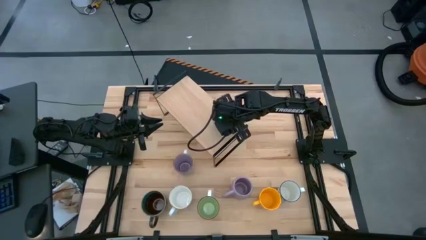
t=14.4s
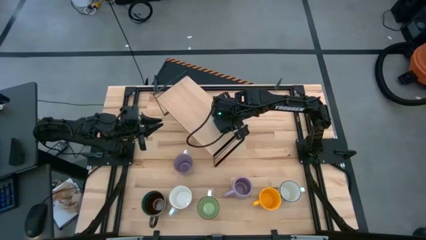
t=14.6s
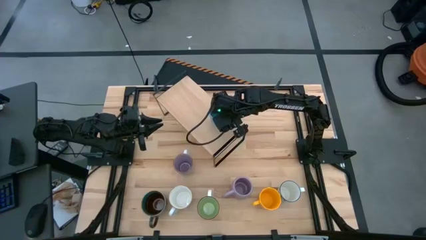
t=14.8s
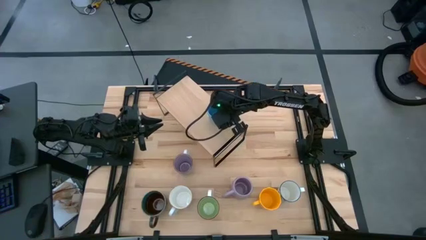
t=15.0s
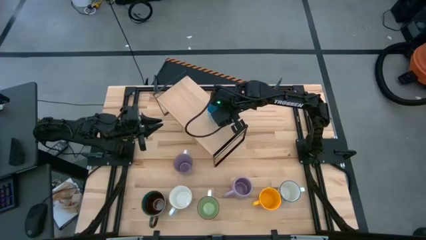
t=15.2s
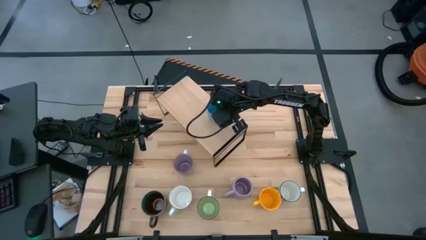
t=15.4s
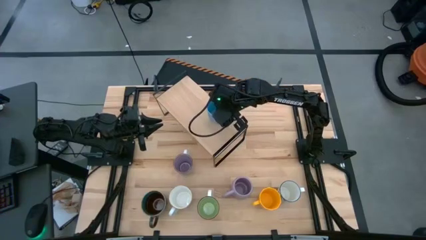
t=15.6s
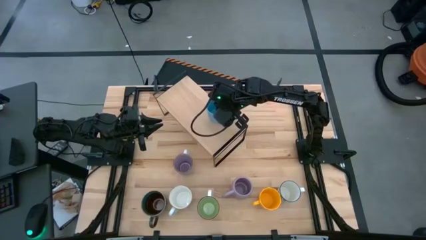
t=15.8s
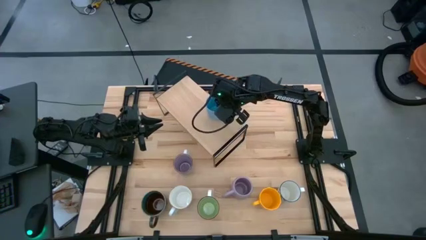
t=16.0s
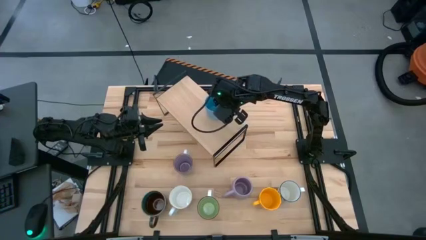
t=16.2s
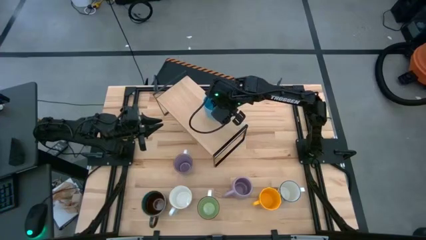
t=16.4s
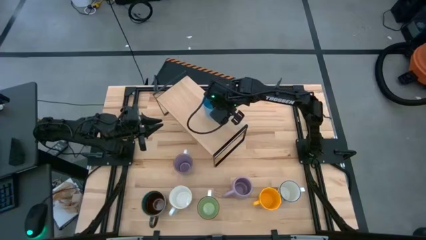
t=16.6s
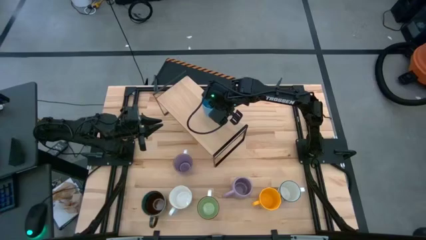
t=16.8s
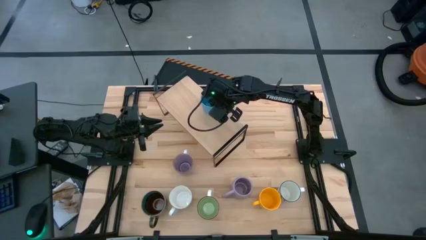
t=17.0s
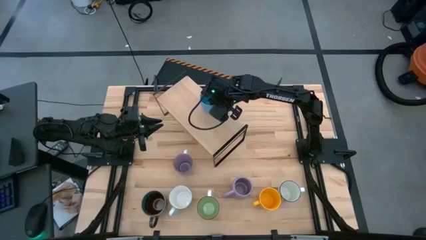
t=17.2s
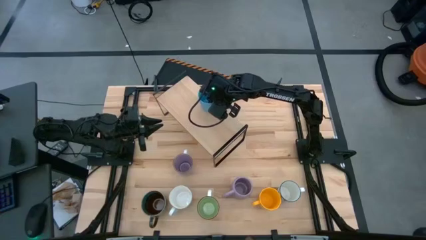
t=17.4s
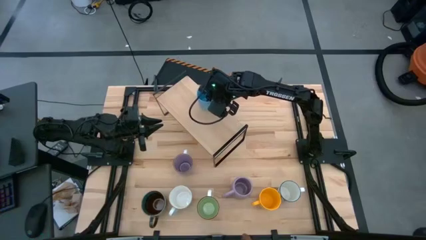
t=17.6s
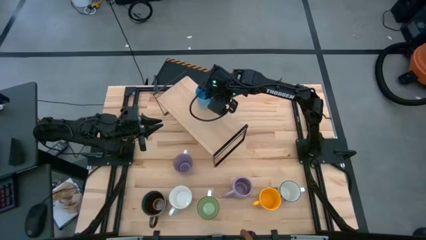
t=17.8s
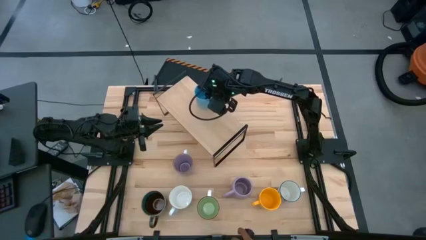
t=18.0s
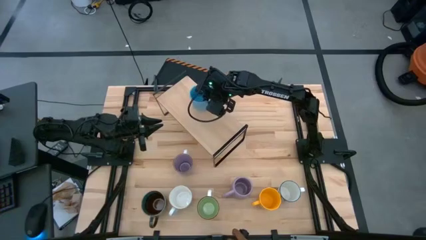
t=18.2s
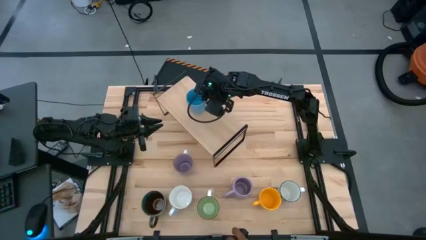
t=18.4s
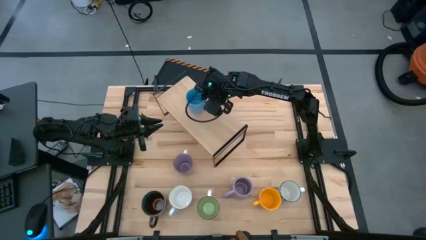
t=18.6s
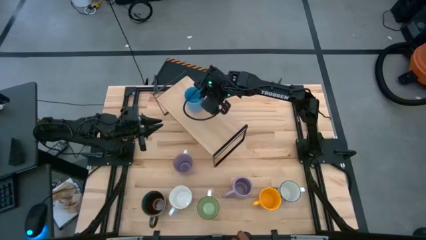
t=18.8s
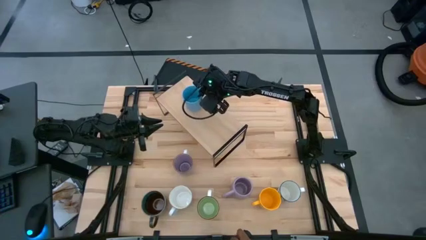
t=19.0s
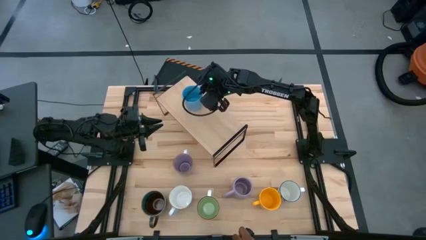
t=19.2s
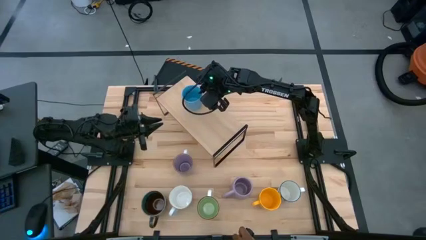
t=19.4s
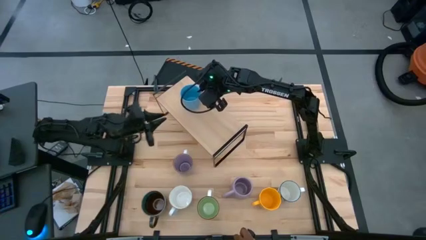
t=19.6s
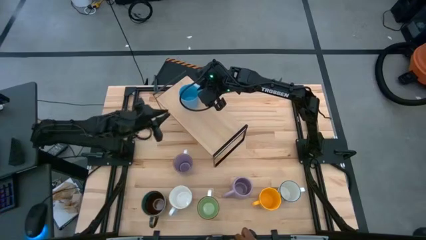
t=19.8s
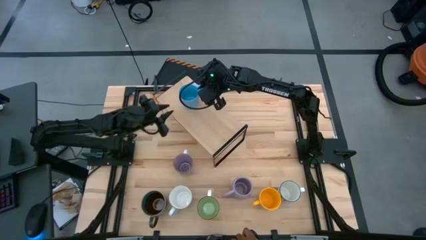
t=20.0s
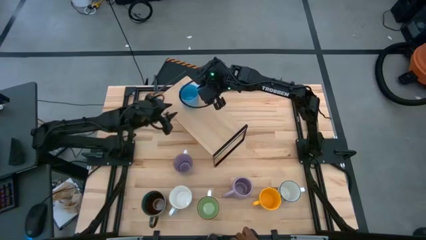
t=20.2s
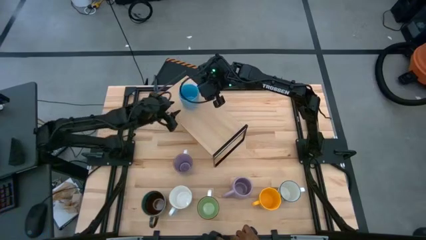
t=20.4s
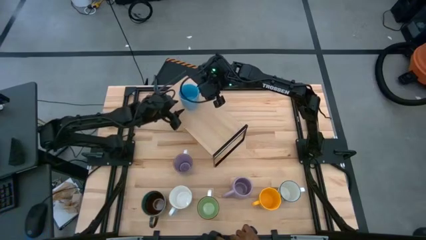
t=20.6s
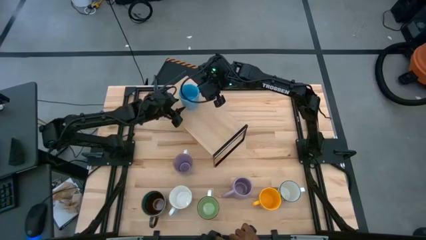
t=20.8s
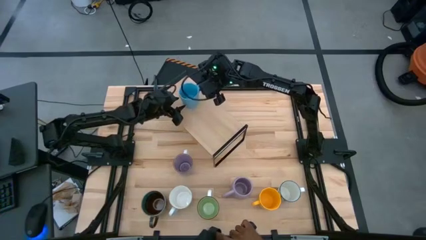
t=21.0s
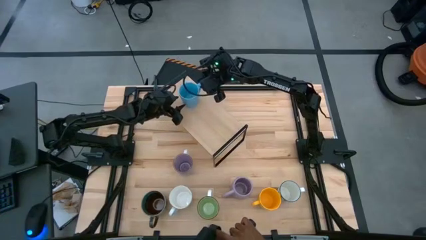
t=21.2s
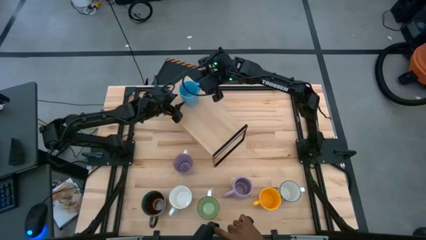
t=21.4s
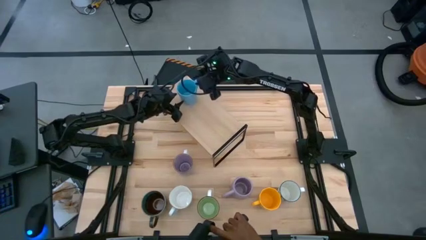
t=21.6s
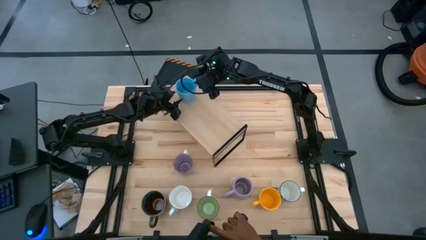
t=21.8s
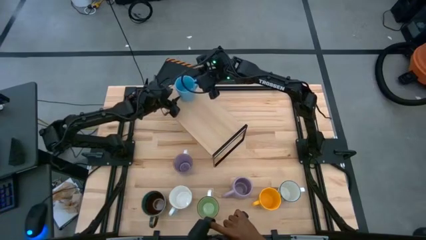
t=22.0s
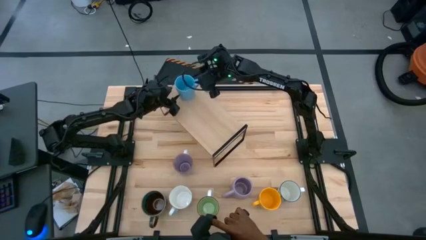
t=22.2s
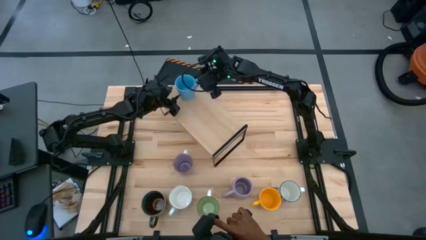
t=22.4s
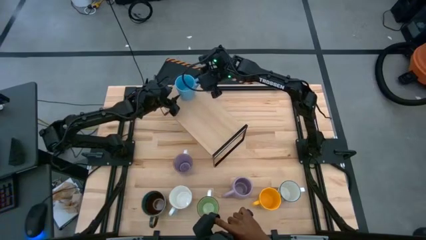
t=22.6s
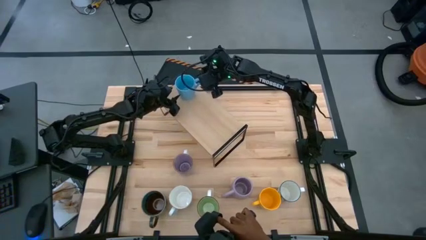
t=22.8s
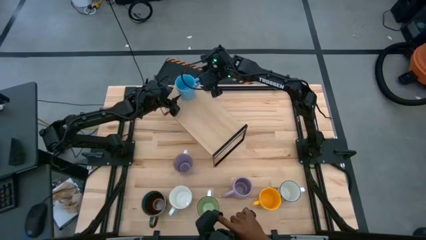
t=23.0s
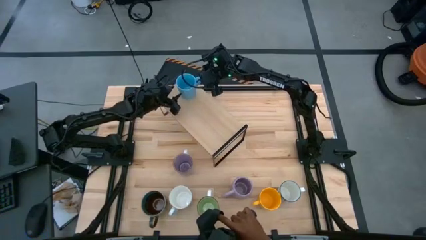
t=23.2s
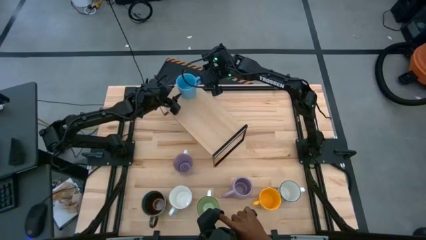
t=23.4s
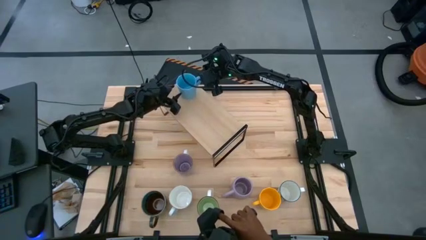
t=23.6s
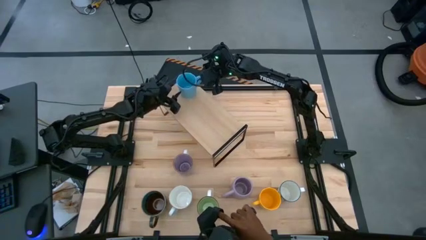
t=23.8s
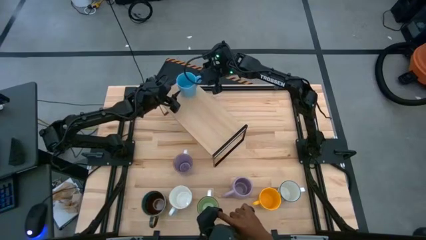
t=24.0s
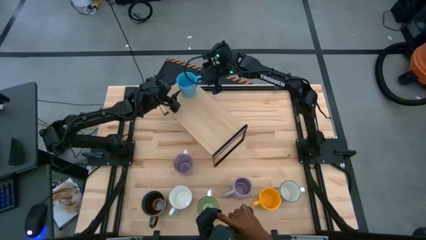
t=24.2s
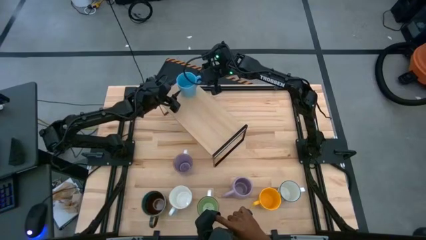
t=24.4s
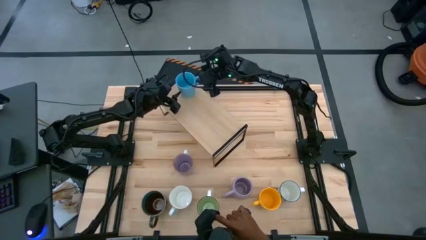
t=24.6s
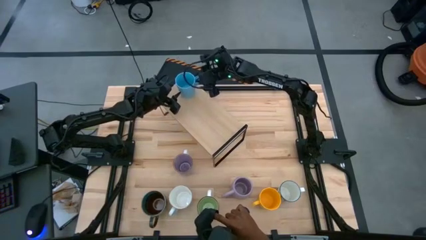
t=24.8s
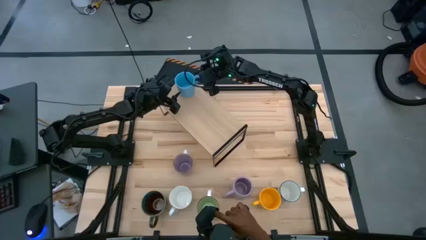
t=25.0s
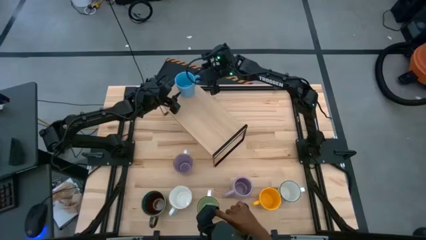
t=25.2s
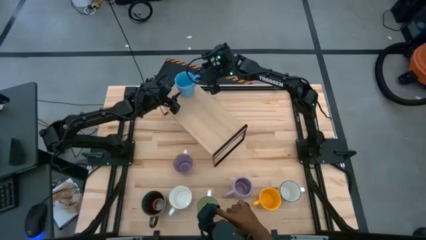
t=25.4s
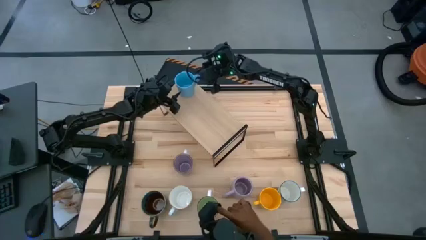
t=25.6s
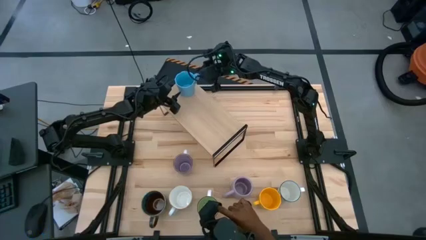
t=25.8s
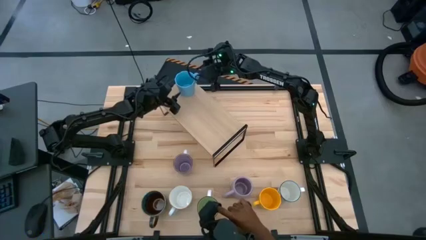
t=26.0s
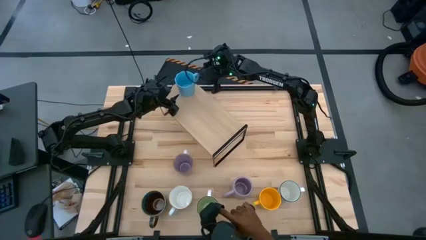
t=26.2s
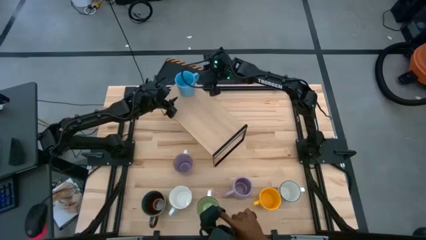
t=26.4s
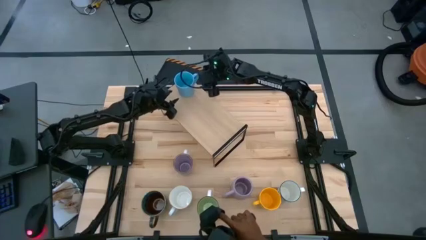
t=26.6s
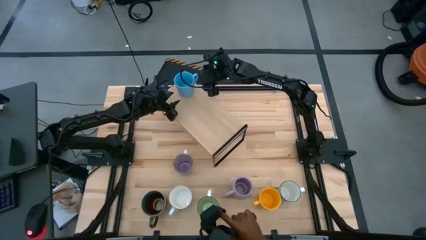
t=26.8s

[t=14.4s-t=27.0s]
Task: Place coffee mugs
Put the light blue mug on the shelf

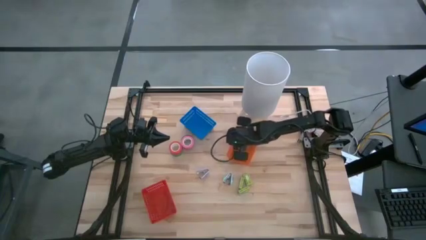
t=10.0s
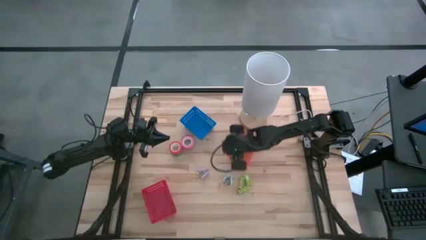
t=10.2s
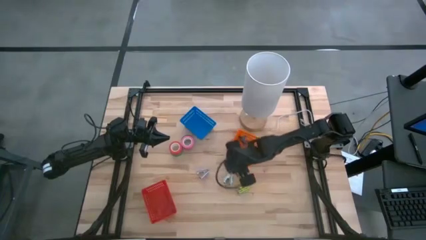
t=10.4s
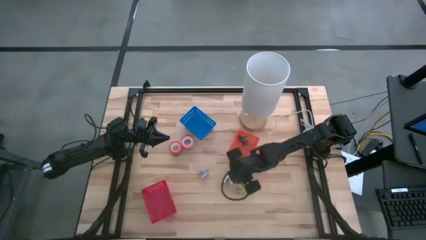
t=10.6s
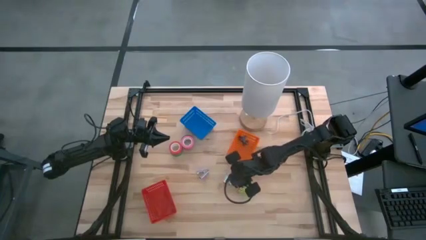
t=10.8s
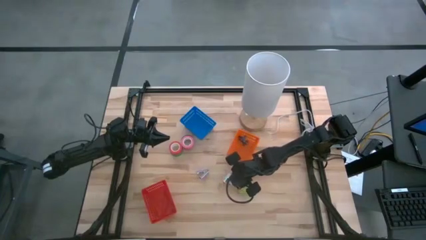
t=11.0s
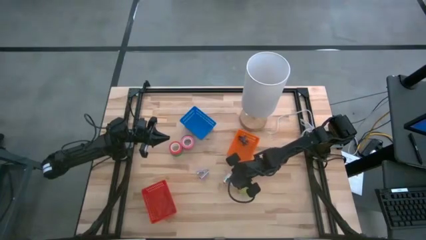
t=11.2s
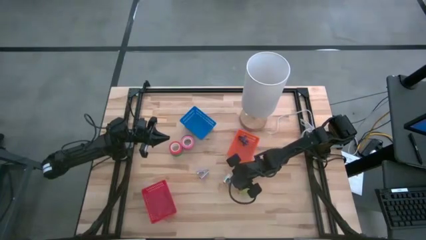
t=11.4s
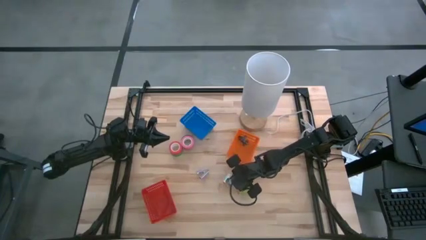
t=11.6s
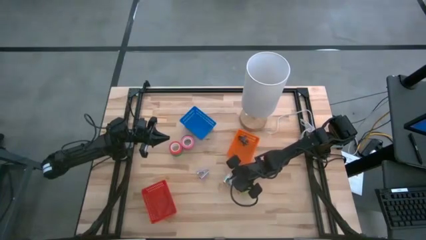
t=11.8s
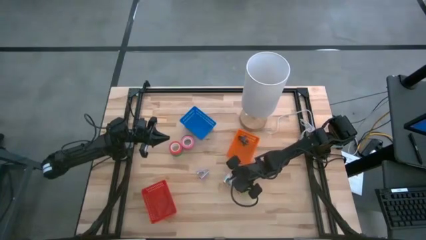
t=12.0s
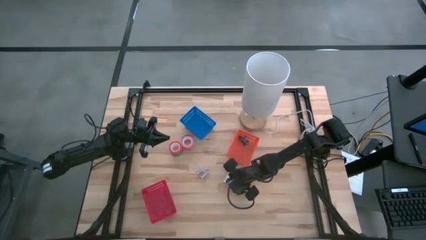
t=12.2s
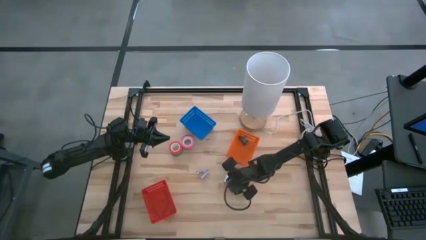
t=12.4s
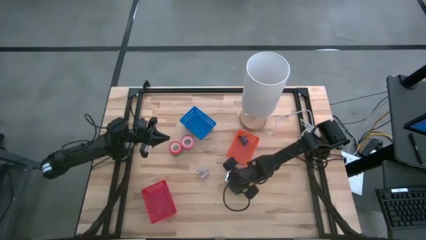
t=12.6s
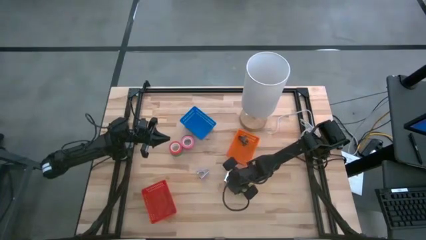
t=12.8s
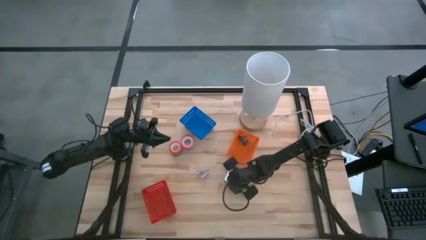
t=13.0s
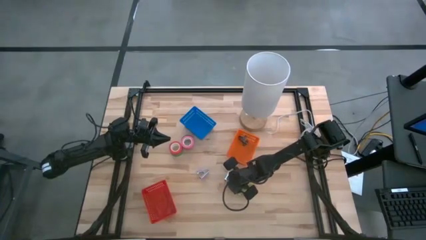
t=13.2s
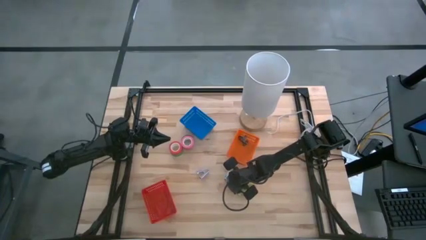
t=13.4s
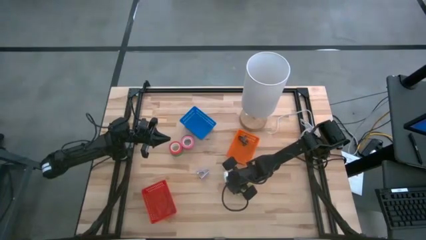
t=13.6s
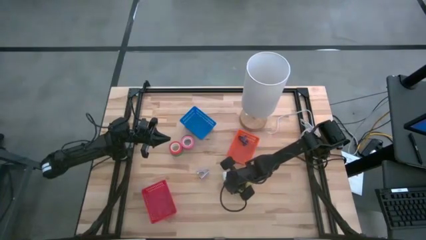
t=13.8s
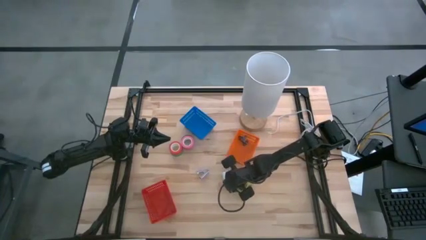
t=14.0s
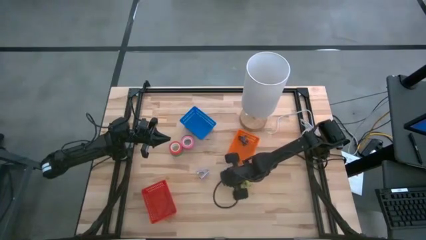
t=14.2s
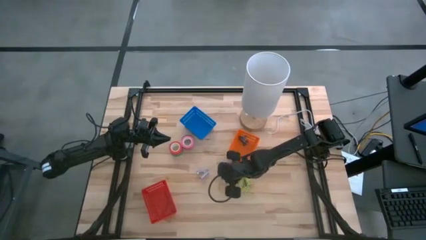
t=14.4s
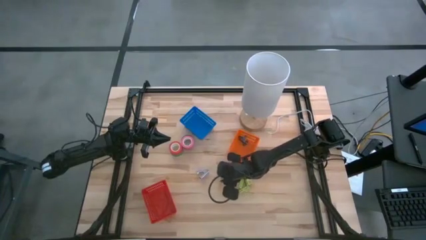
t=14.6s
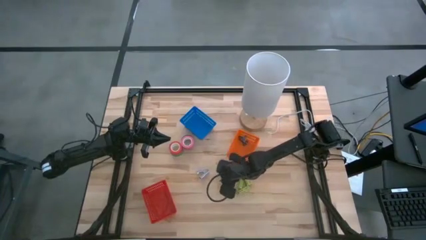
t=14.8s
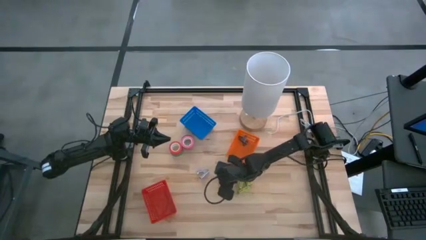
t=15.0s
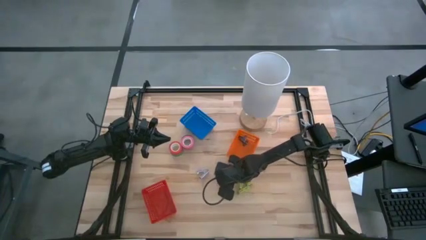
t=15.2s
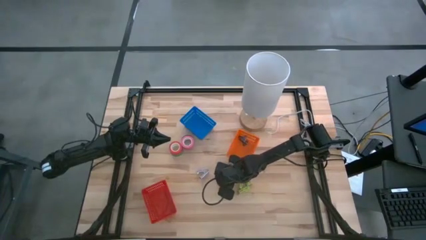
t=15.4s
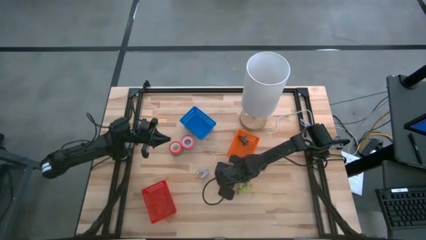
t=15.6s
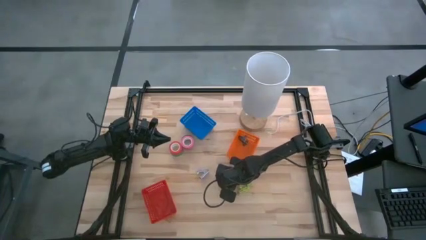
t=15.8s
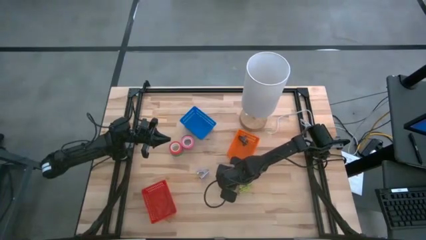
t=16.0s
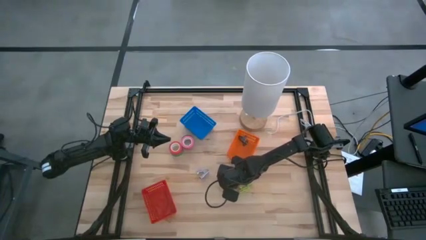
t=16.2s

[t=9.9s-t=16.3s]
Task: Pick and place Stapler, Stapler remover, tape
Put the blue staple remover into the orange basket
